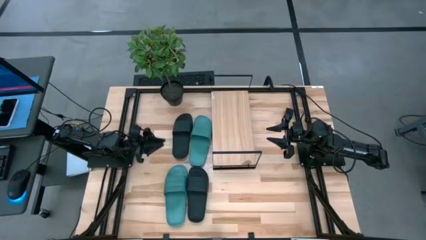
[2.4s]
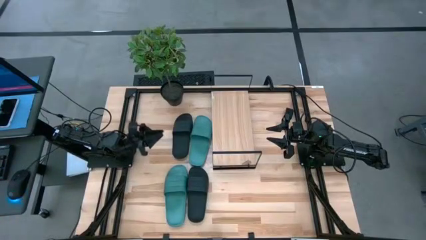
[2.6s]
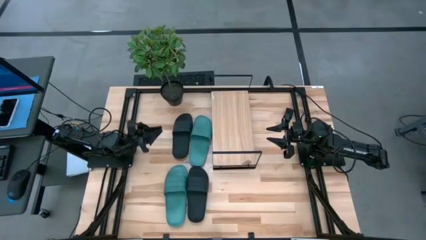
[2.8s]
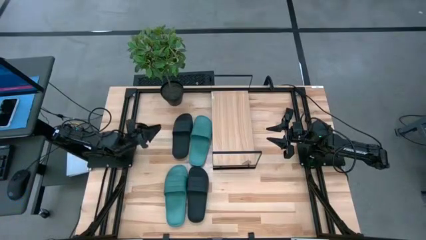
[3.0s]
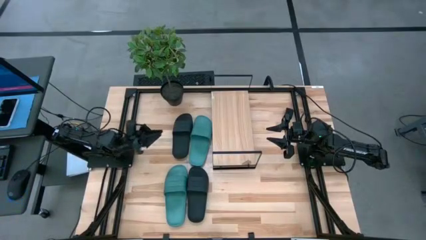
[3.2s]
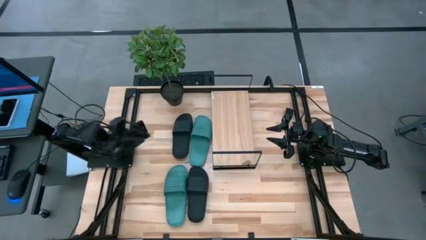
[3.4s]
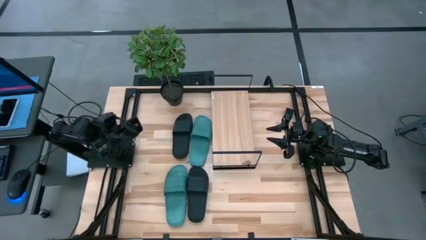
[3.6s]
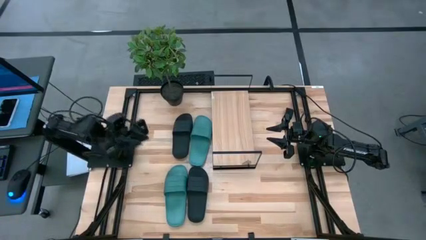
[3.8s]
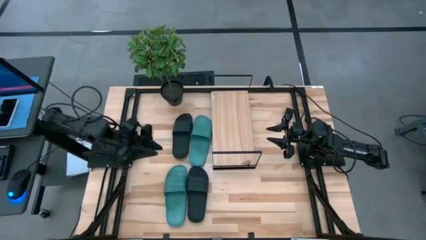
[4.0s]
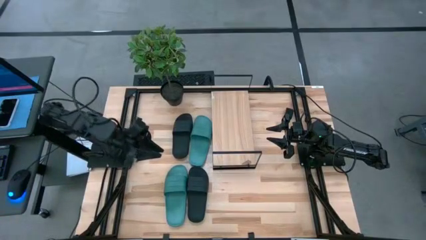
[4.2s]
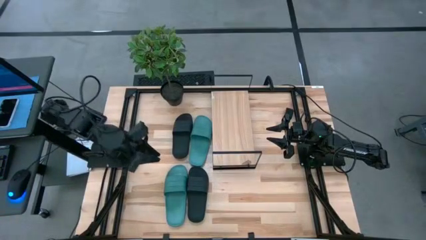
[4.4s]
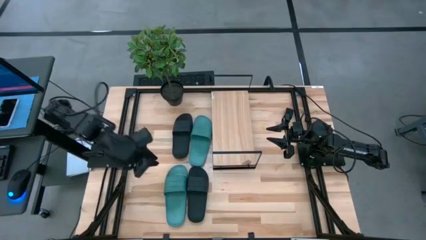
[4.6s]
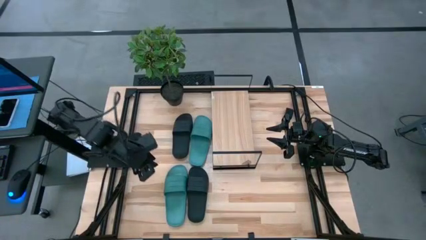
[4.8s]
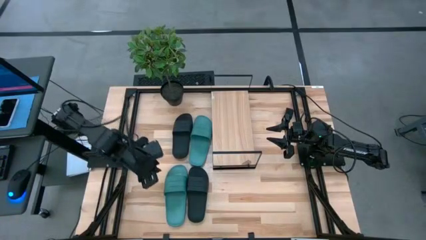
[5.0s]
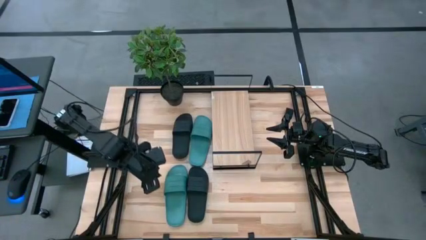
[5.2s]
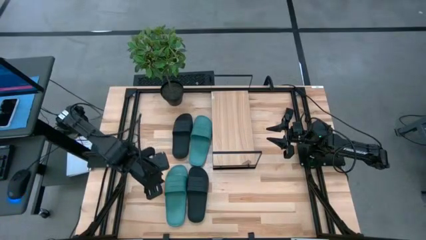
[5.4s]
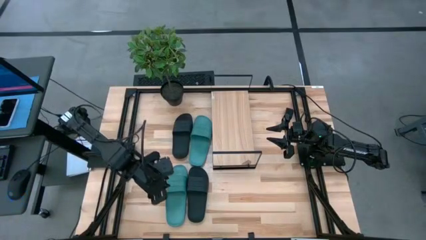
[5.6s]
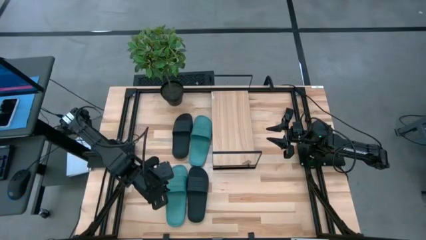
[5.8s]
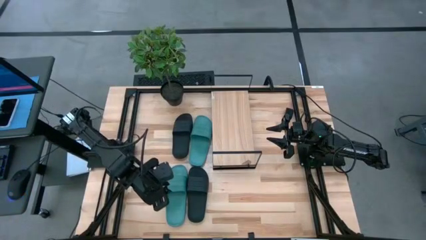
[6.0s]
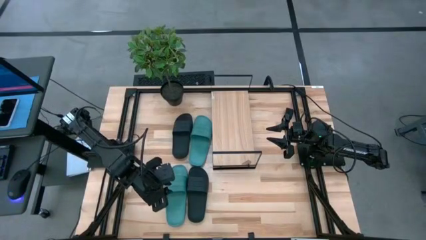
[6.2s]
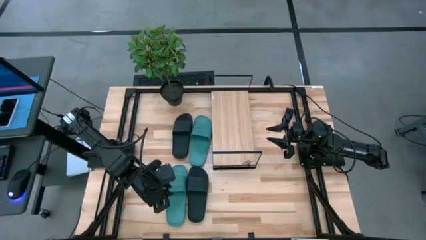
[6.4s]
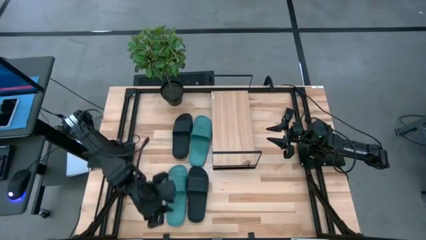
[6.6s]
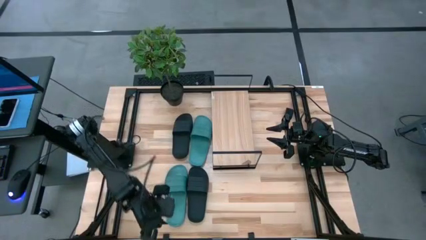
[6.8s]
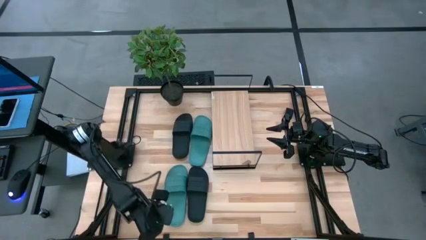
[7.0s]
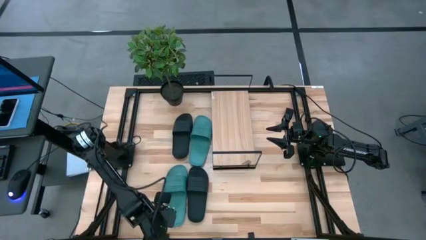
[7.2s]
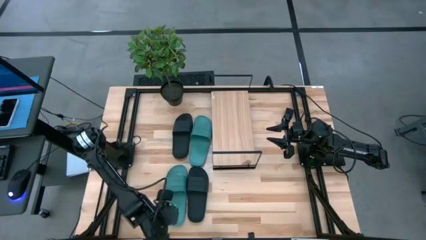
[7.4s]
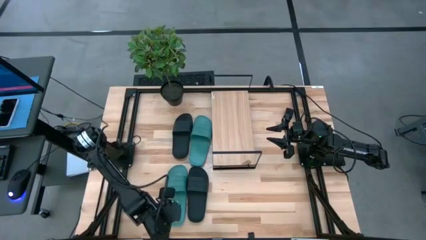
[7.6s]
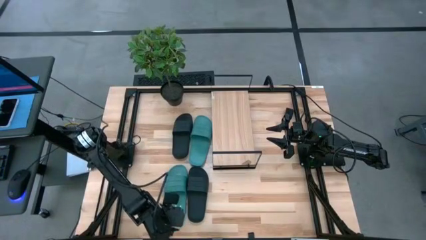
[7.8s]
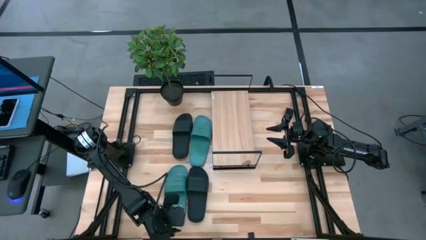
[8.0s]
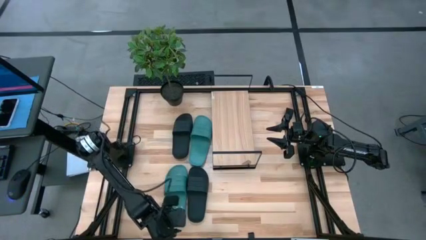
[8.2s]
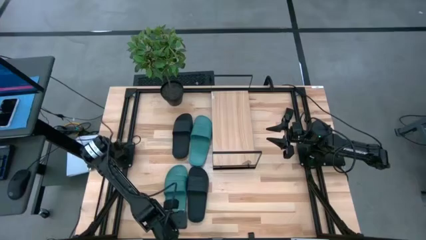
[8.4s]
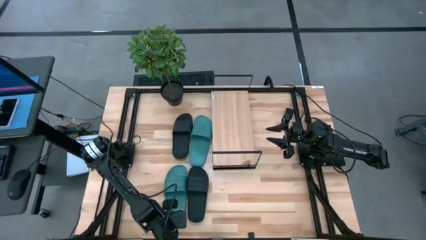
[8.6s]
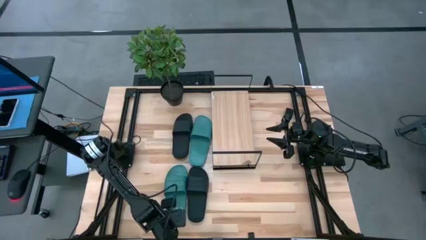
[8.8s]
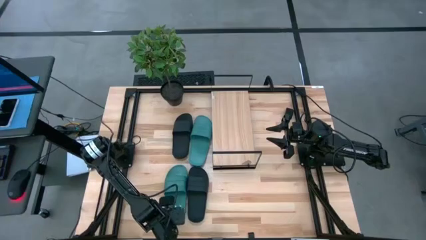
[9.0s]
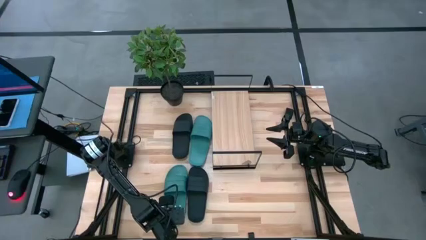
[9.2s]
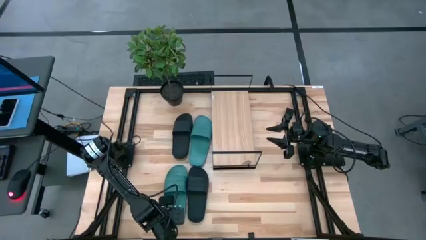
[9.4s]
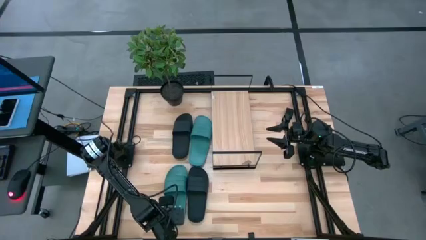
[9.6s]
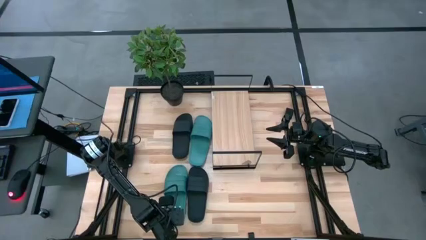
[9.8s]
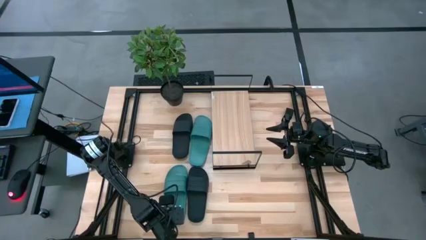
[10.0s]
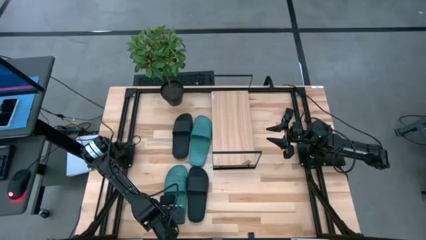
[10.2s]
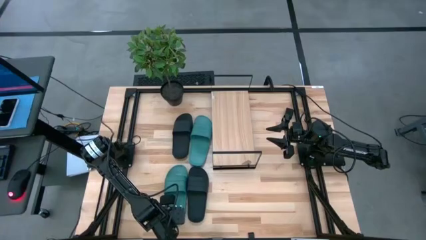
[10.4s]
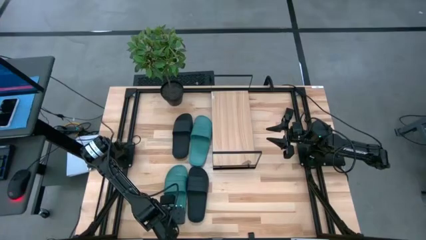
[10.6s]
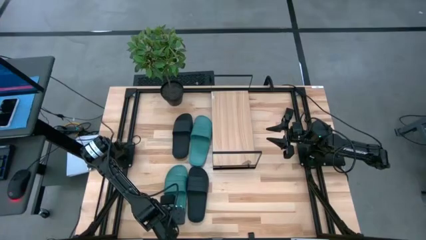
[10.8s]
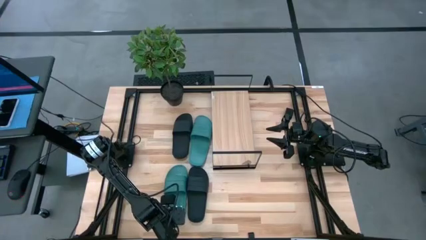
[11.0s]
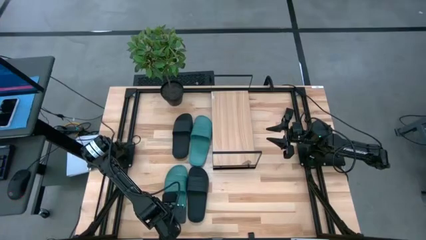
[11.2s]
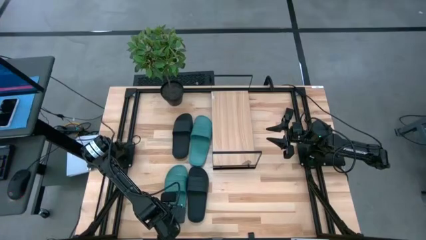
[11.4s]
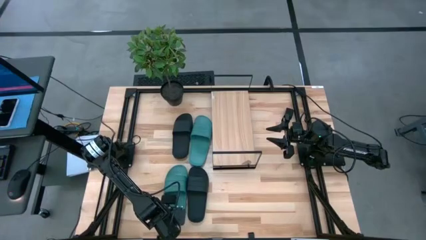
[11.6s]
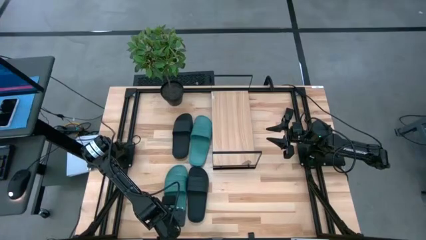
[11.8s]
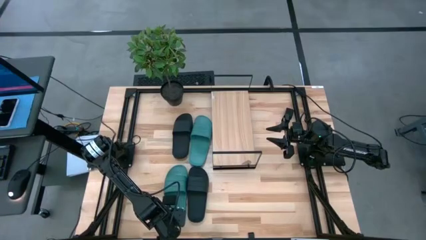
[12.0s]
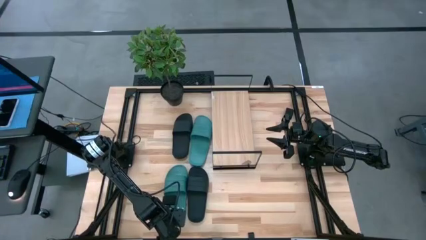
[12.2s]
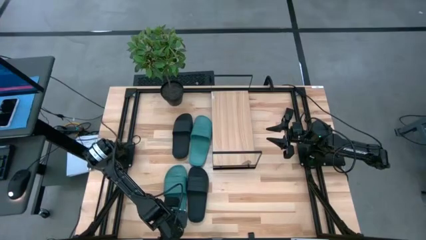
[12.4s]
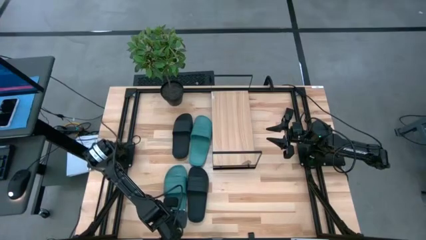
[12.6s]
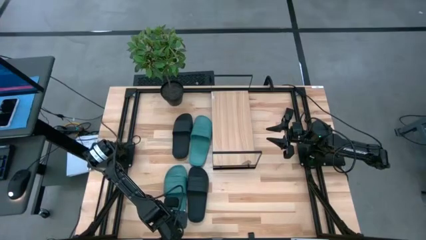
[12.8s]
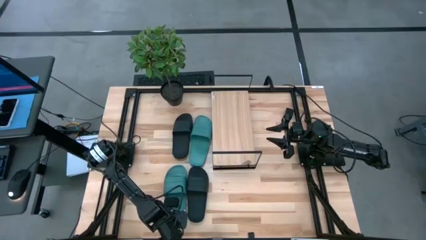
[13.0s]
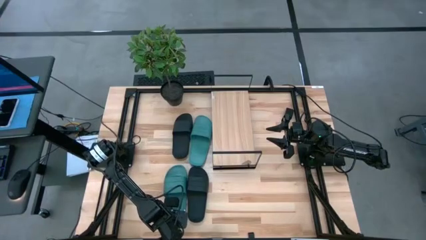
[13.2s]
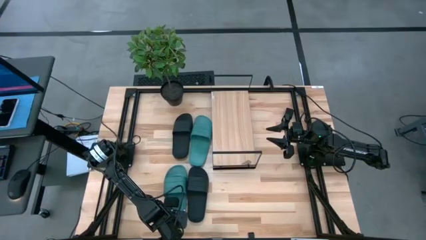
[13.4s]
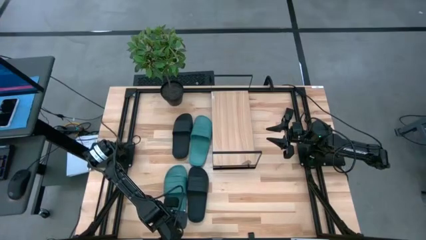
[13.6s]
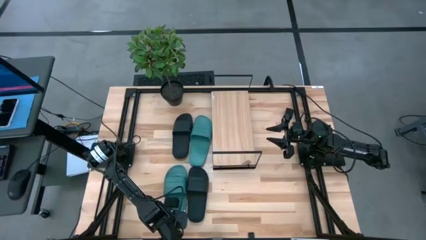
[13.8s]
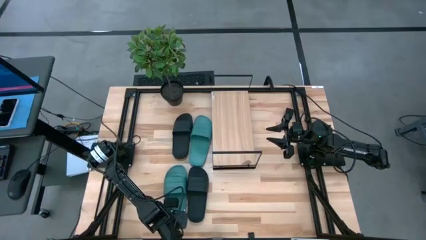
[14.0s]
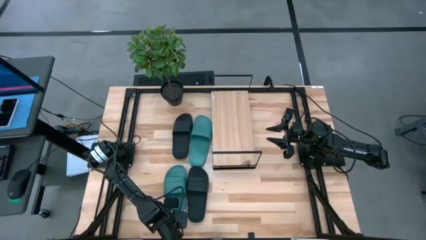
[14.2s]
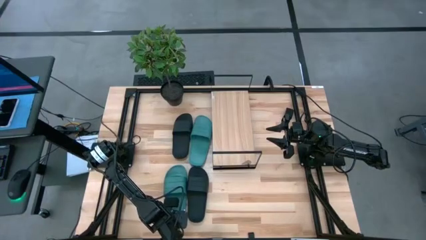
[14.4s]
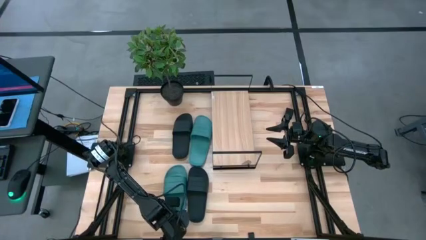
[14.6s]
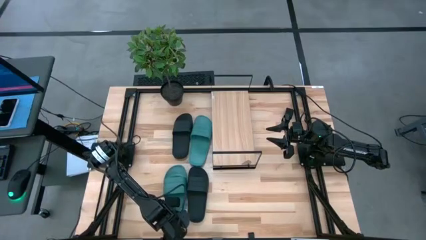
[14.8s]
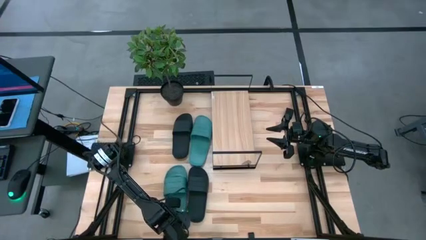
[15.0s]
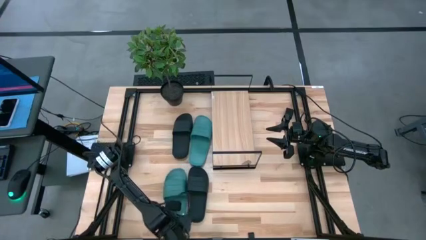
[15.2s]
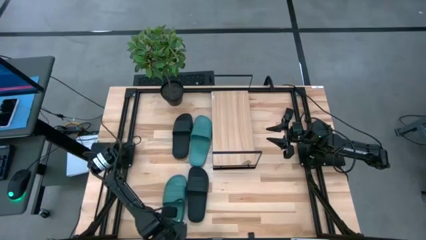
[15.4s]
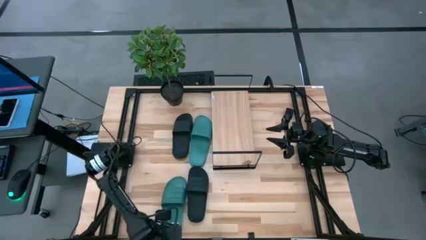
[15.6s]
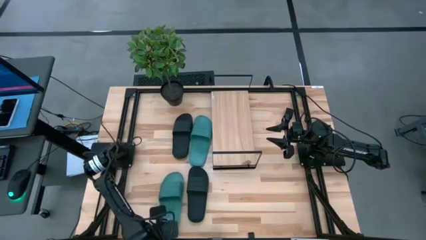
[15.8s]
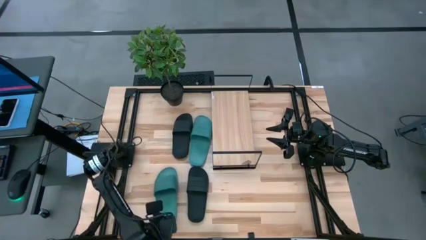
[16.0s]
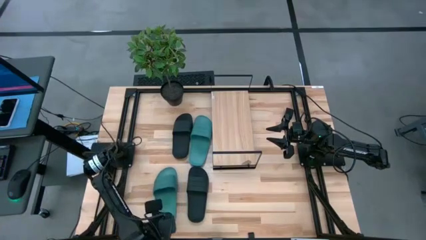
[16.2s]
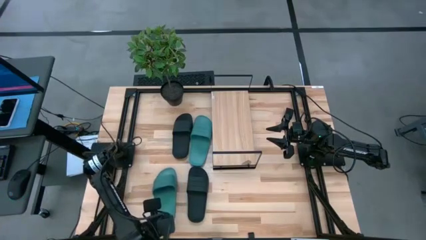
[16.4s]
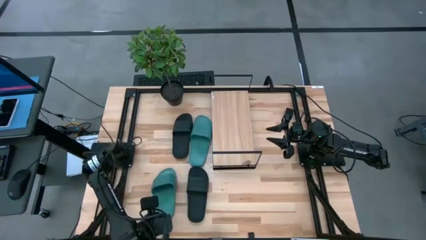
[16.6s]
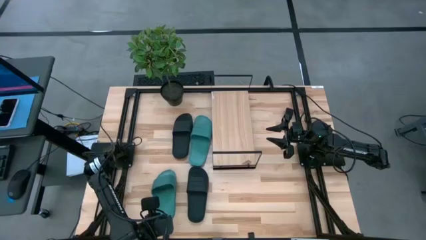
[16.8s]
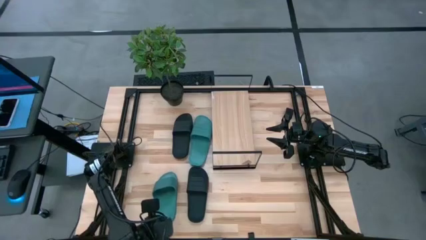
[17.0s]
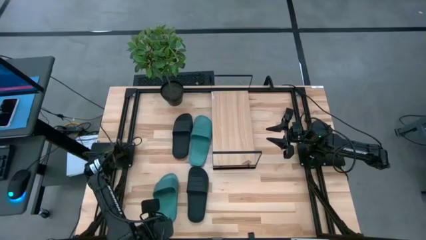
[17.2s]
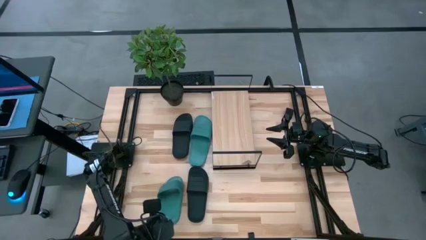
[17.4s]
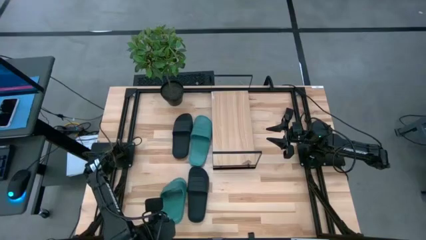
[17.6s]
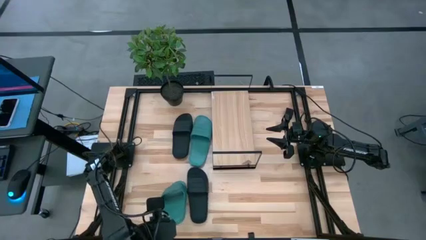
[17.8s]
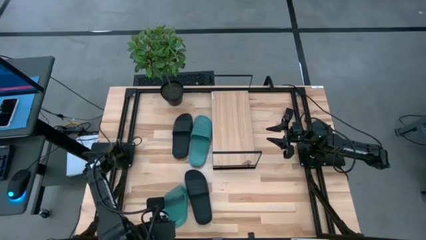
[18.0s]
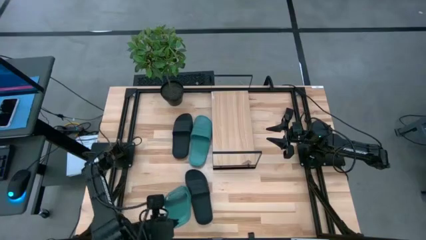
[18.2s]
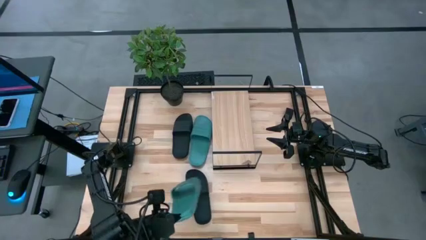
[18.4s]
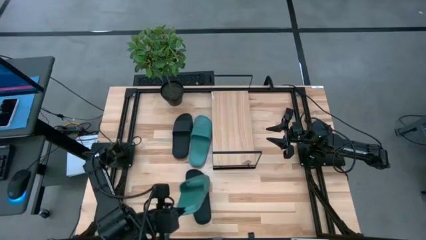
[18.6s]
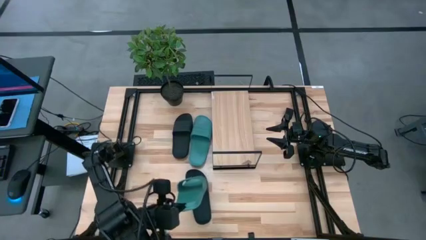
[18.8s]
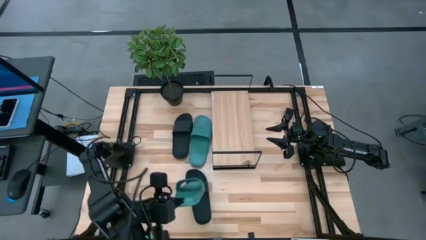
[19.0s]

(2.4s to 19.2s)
Task: Pick and place slides into the shelf
Put the bottom green slide on the shelf
